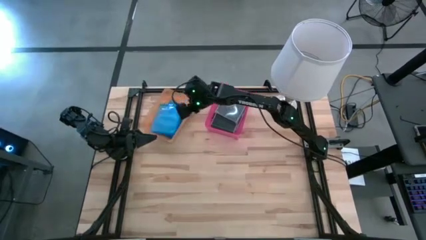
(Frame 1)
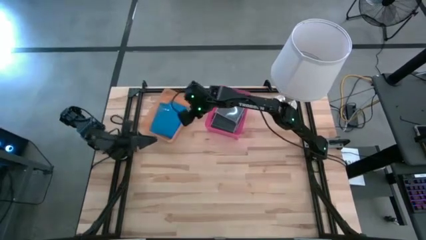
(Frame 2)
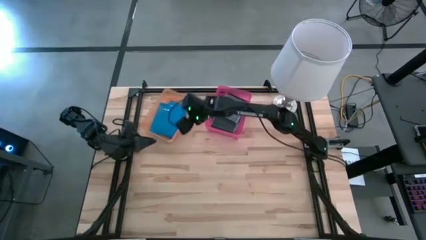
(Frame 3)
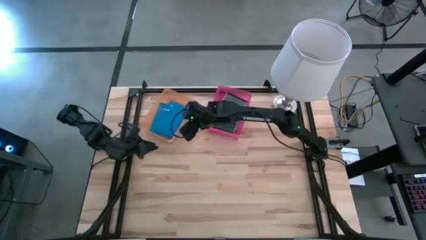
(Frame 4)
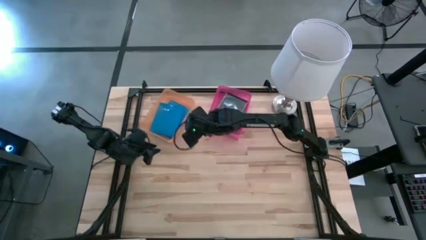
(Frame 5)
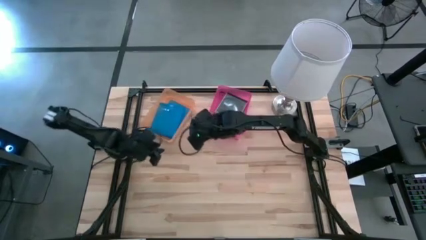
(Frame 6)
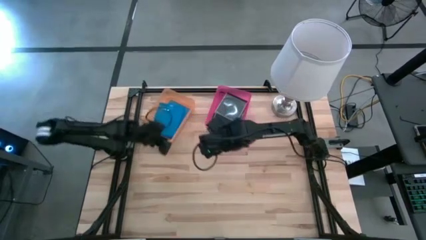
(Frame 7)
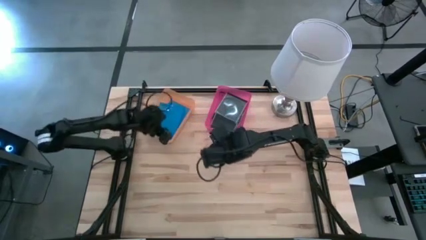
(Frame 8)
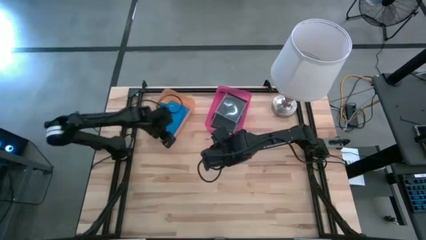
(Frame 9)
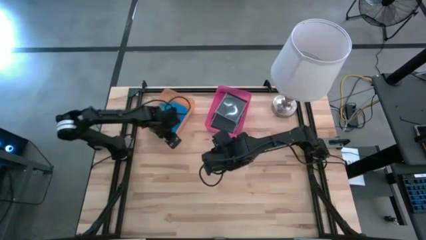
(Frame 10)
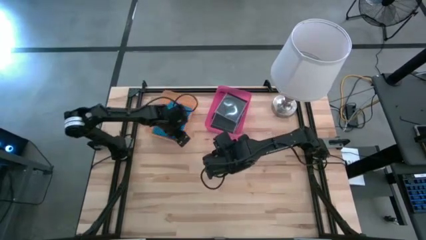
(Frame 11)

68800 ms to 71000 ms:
Task: Pick & place jewel cases by type
Adjust the orange bin

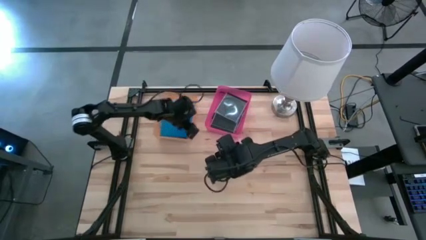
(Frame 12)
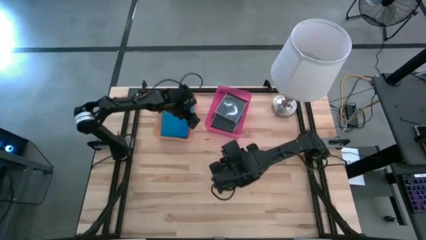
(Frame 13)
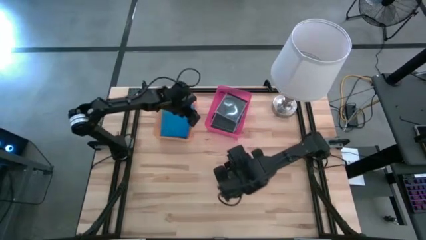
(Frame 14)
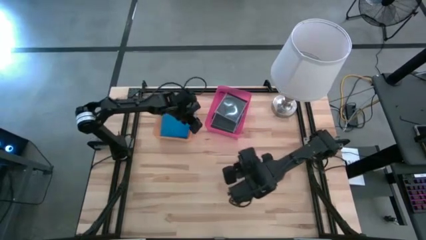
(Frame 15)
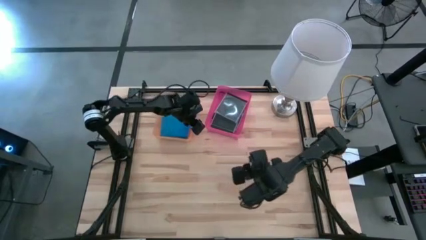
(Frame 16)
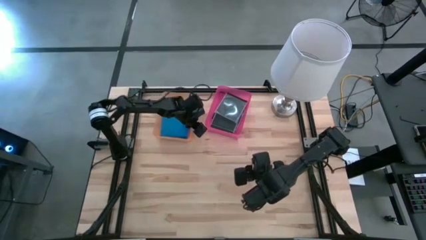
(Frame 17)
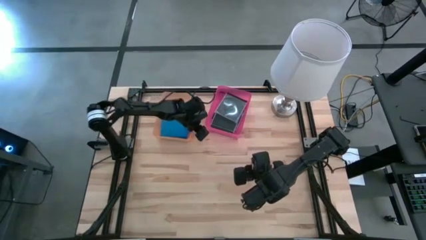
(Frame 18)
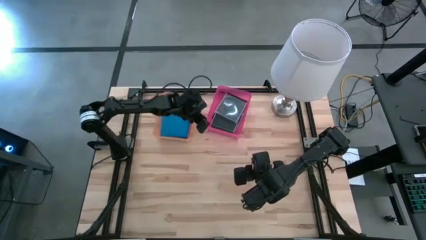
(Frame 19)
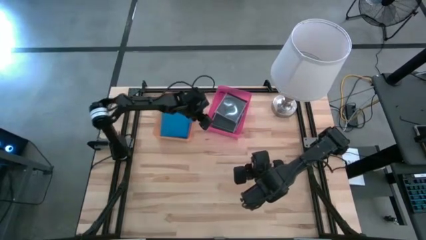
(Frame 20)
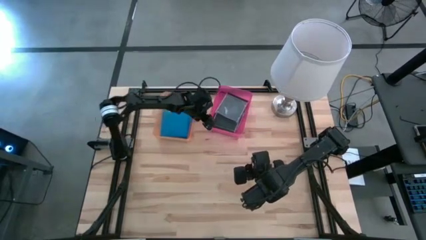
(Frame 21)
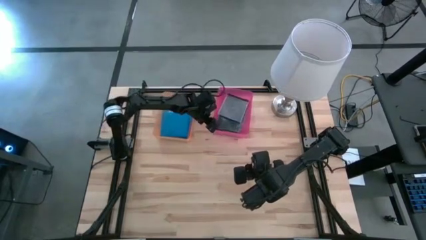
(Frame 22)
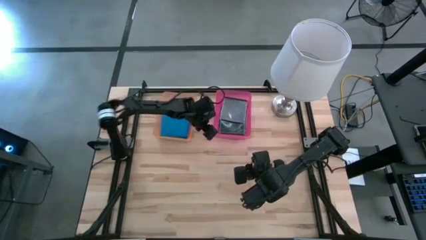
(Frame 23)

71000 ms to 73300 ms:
Adjust the pink bin

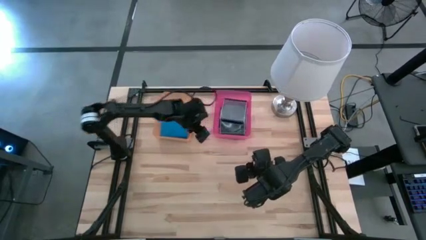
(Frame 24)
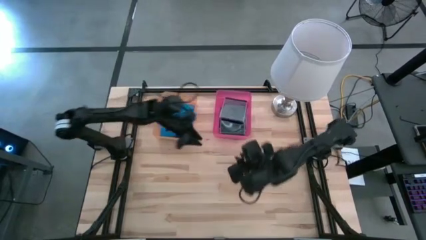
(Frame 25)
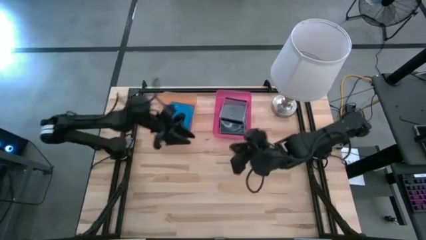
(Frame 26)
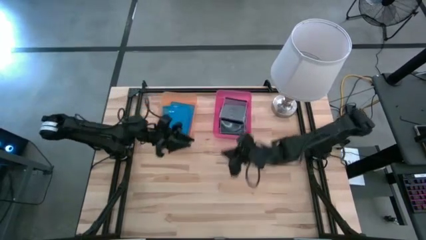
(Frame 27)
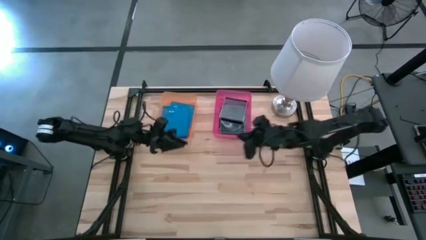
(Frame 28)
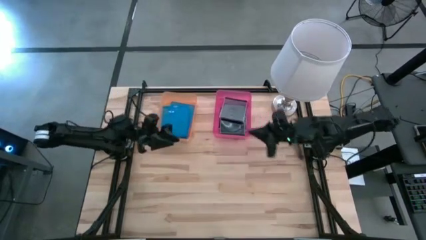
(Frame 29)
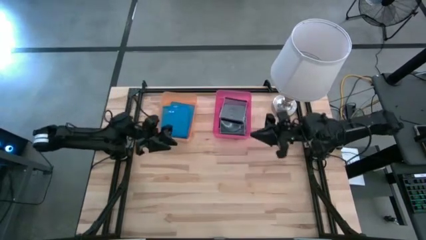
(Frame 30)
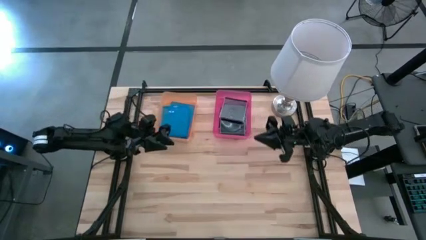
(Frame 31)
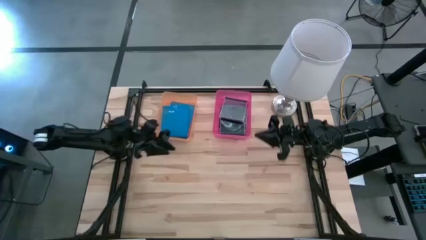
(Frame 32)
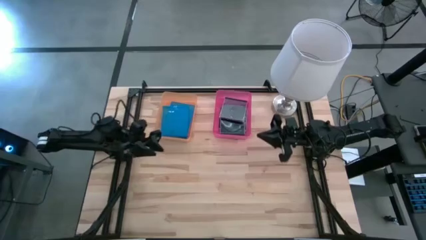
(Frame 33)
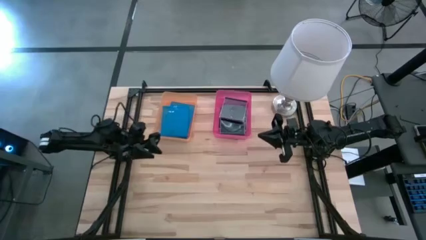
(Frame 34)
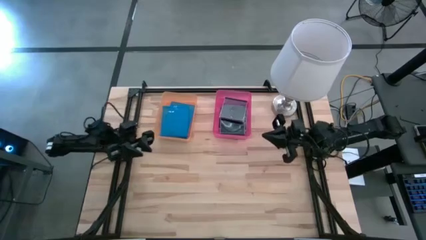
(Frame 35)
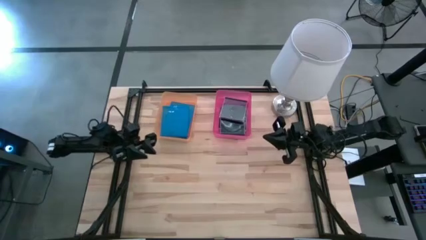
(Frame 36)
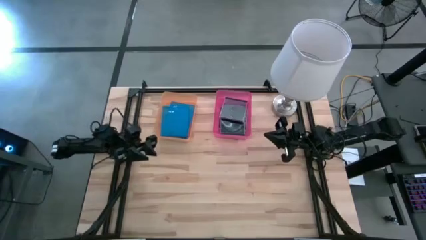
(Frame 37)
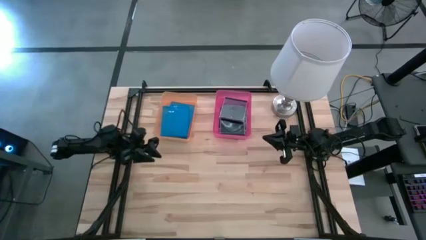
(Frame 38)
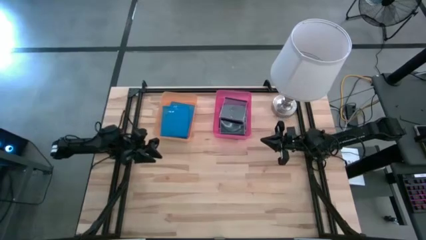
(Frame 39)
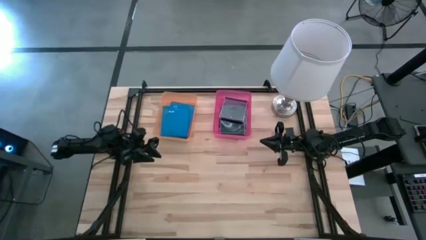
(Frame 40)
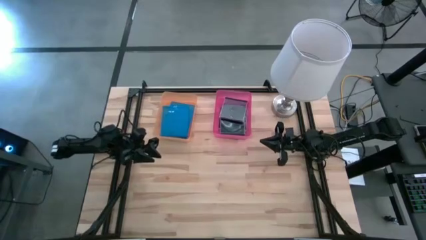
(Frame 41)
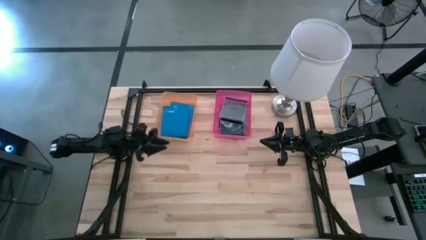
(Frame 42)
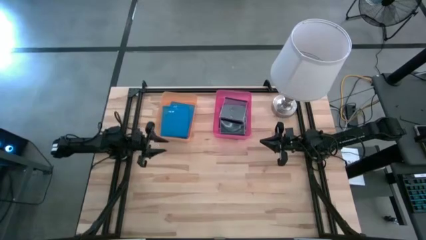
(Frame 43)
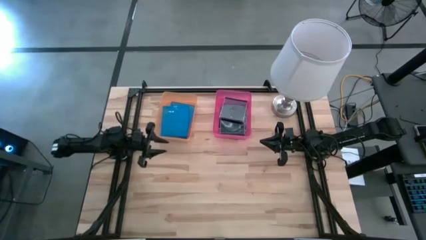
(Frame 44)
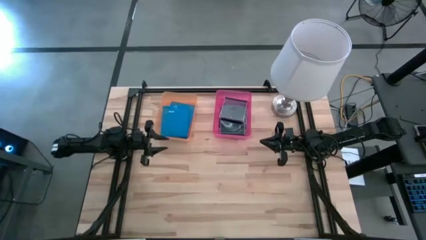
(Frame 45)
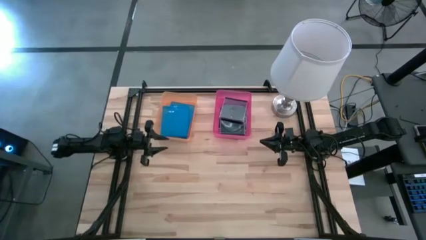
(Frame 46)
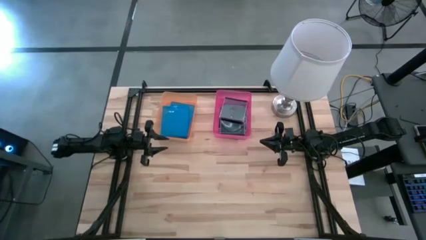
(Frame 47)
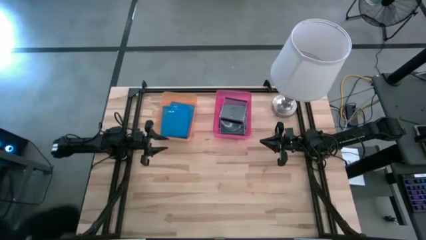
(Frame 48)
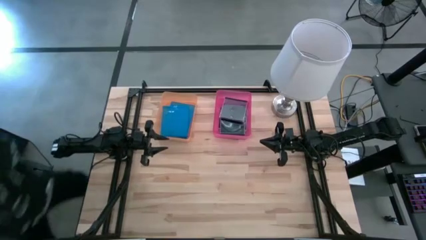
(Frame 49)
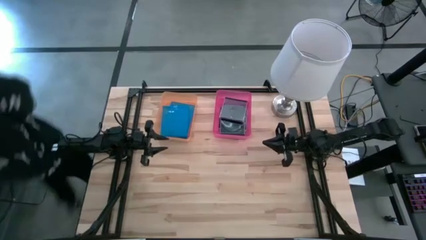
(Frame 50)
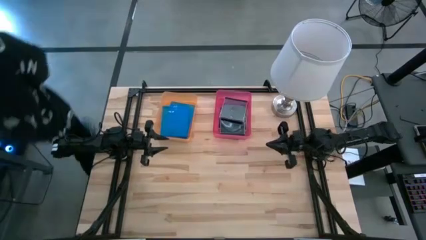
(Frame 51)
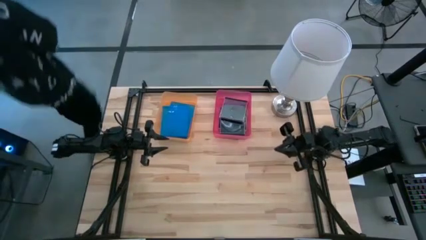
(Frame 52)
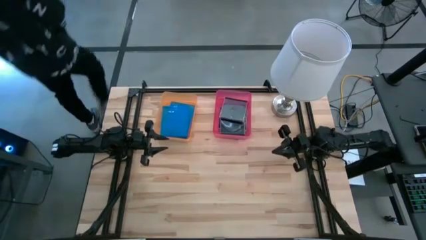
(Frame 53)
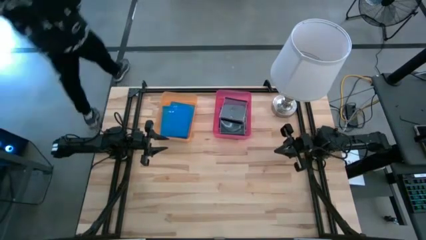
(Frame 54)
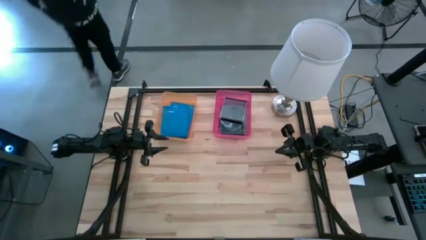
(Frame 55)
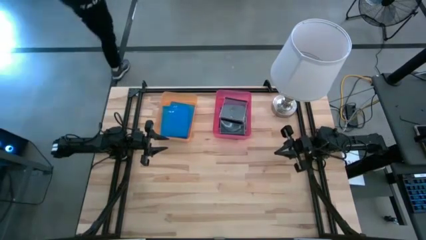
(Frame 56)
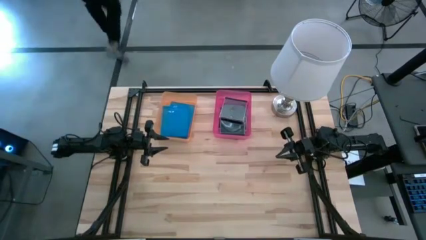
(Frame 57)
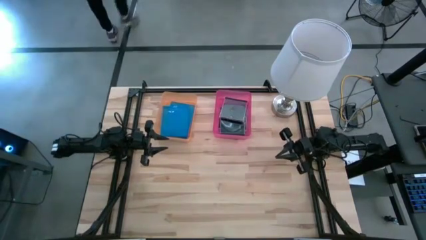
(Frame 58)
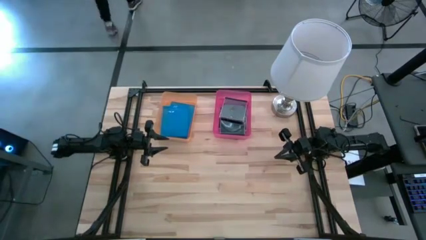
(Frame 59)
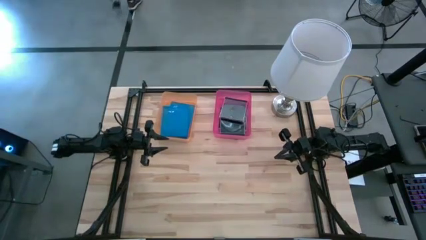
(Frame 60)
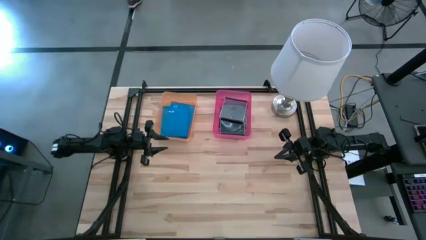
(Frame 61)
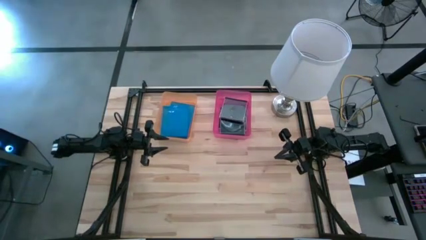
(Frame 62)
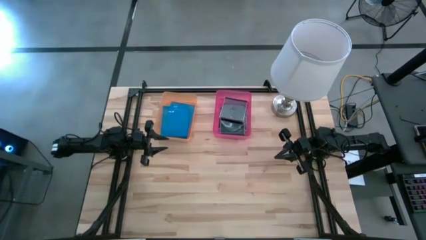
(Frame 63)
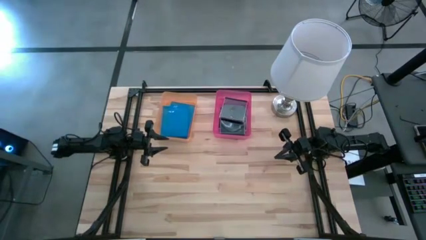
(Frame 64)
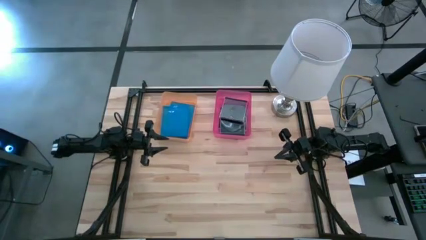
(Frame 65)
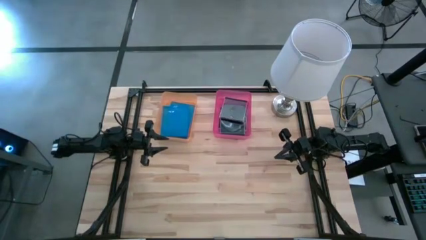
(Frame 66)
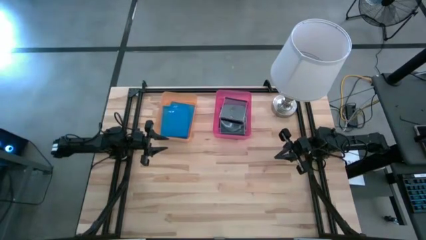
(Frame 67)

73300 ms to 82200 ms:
Return to Home Position
